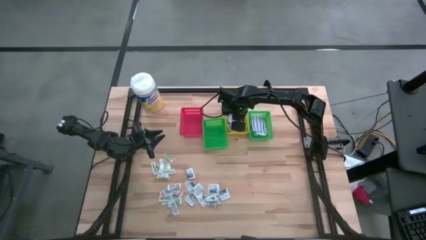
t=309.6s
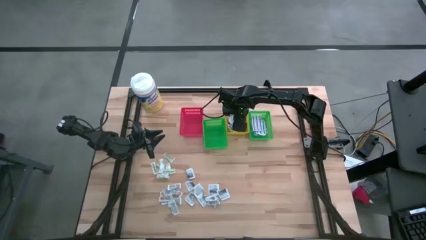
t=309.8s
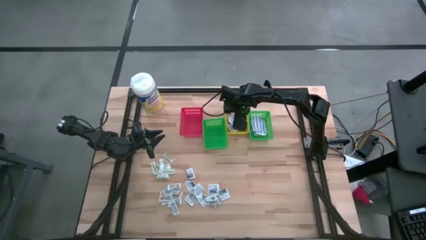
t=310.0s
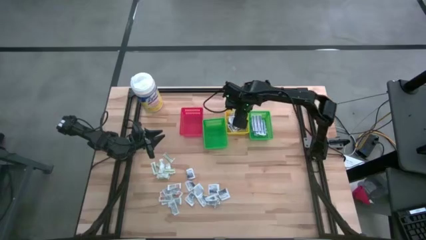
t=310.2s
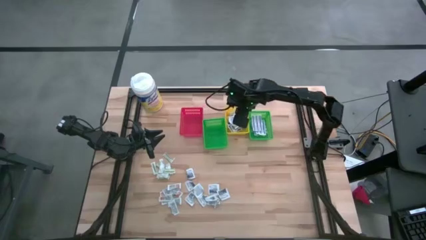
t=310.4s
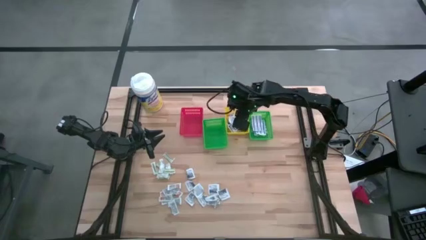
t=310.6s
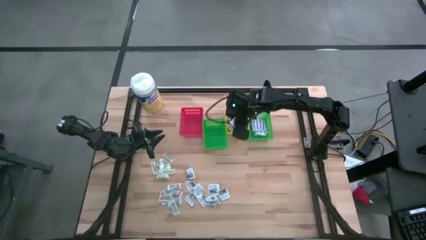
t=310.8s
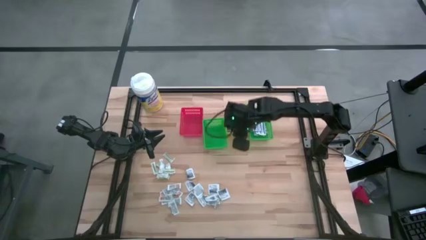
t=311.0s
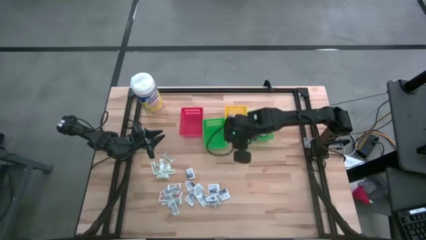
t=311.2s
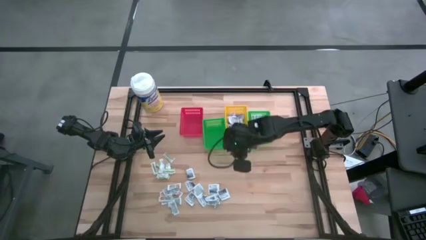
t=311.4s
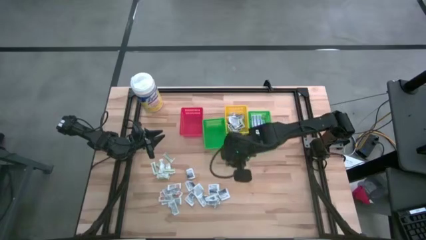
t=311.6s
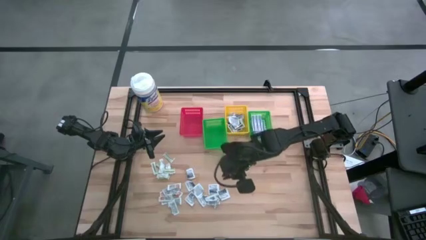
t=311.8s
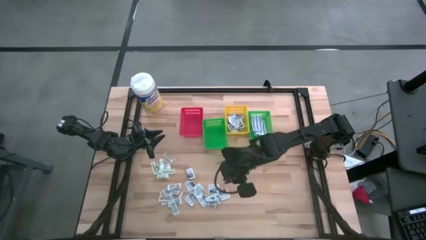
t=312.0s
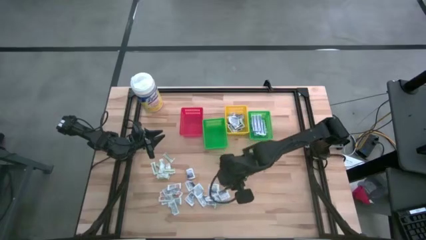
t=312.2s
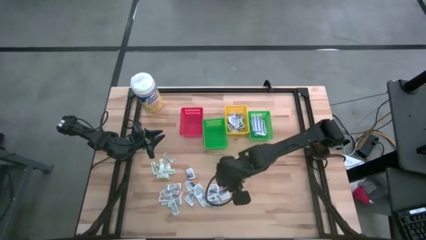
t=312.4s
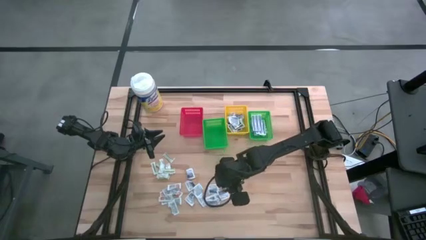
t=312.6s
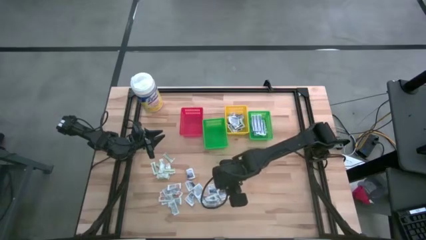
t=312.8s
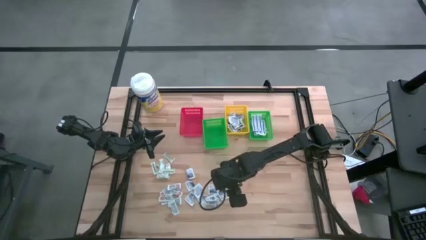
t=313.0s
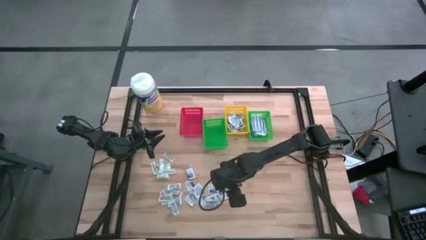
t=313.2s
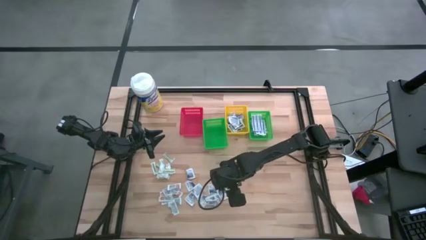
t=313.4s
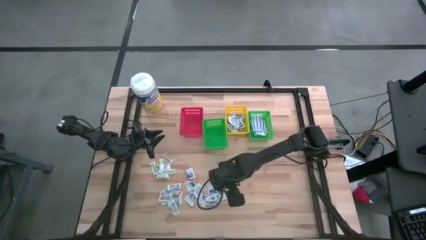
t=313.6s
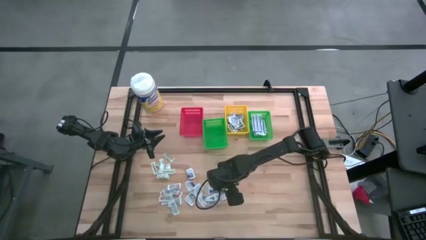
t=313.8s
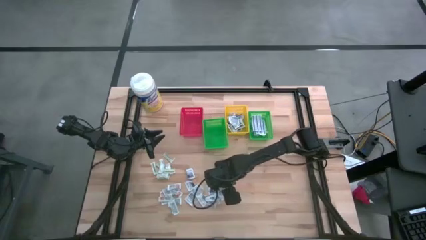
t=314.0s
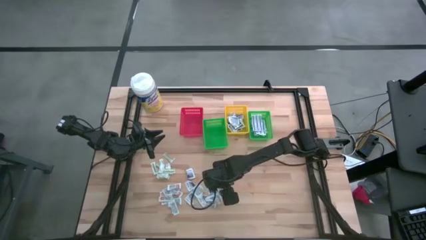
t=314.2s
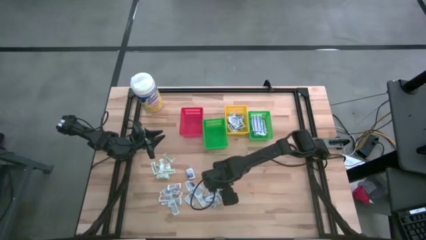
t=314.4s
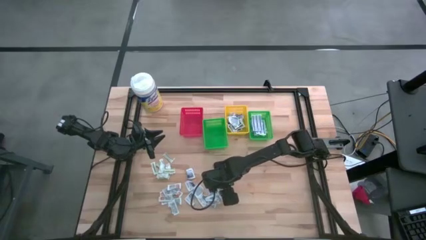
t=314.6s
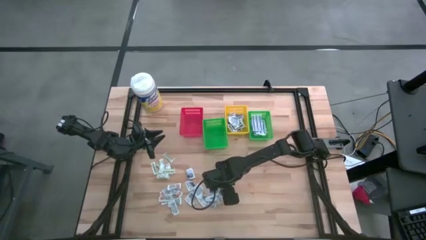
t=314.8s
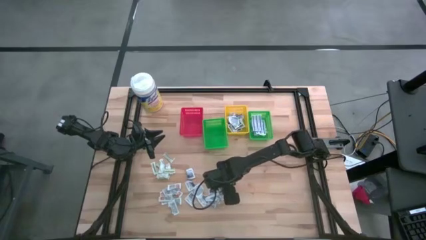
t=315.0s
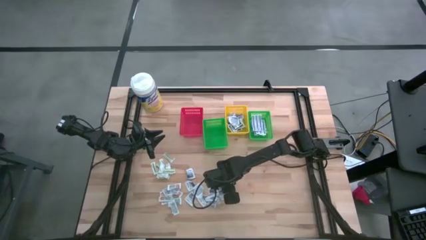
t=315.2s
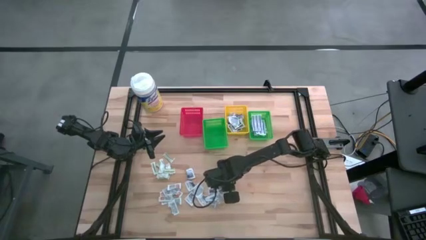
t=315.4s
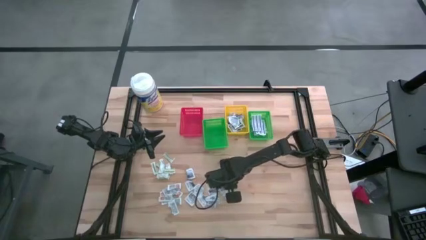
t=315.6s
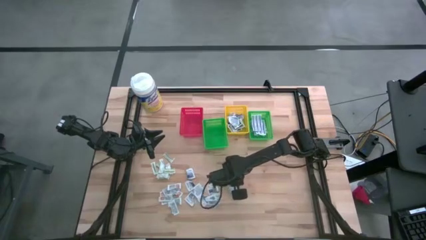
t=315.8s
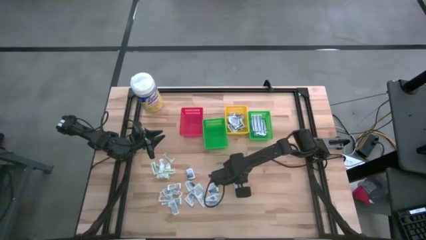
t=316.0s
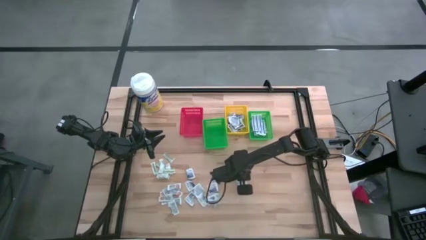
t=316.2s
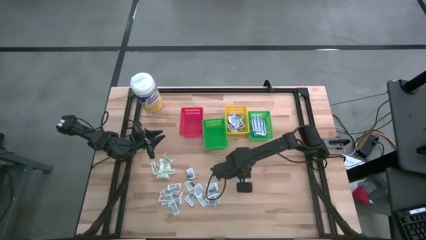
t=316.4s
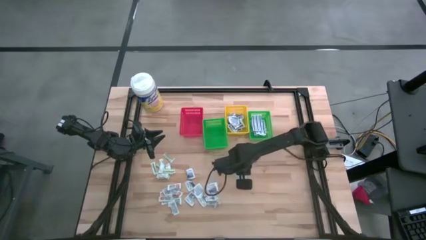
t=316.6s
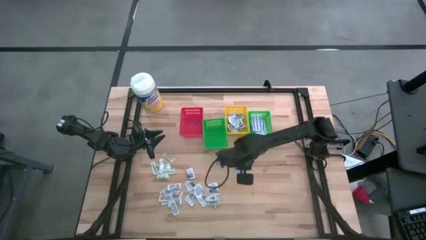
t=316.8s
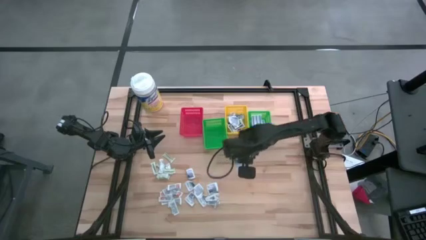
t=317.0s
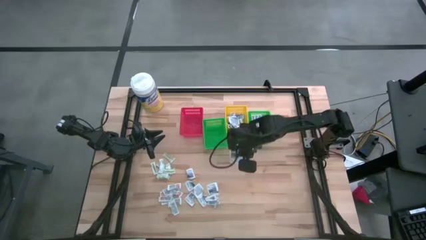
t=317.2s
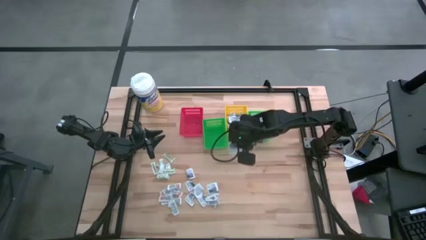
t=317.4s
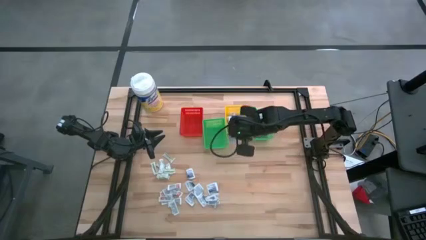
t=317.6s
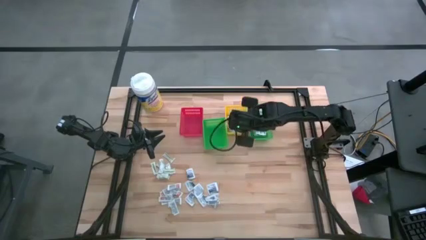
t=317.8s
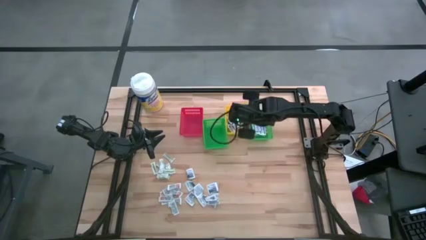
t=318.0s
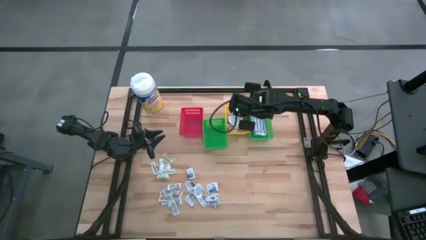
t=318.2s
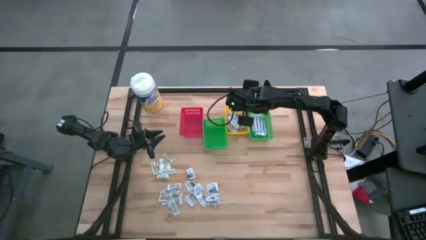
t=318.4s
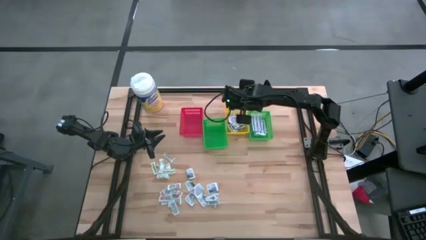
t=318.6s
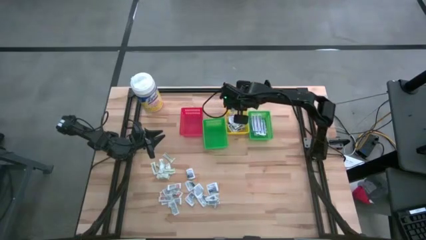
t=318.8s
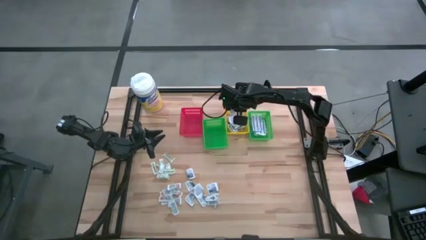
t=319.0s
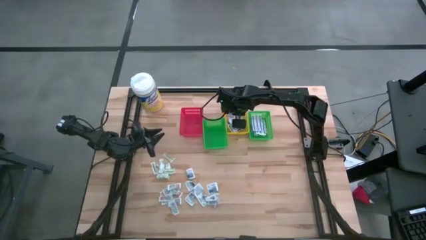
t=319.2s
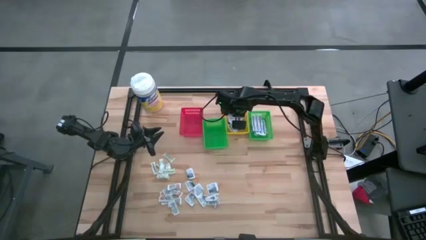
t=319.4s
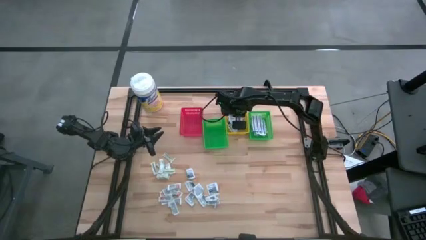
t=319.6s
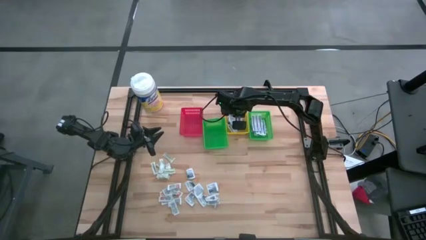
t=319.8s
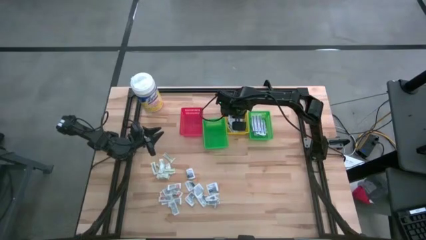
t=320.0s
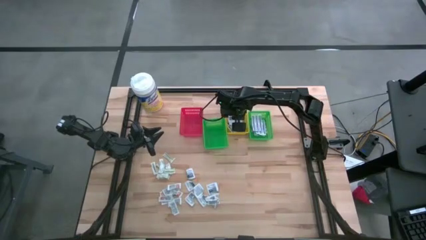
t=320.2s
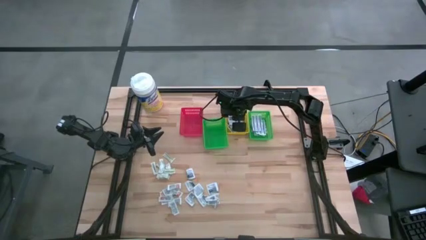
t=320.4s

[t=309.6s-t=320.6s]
Task: Pick & Place First Aid Supplies
Put the alcohol pad into the yellow basket

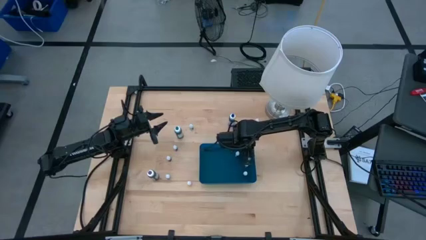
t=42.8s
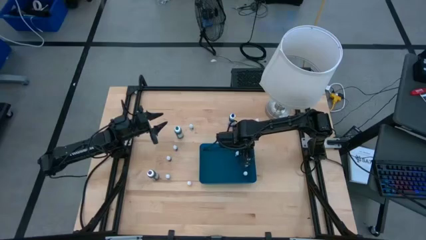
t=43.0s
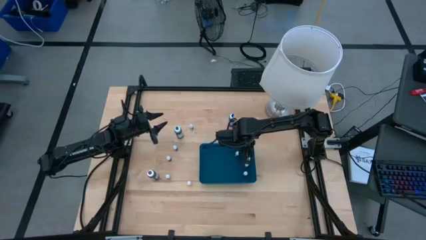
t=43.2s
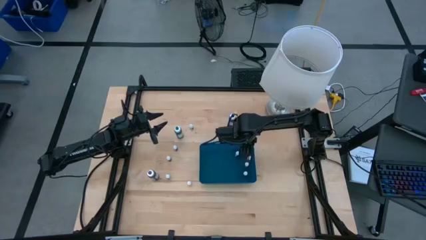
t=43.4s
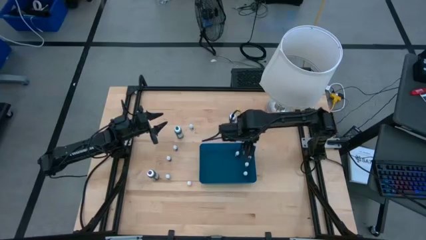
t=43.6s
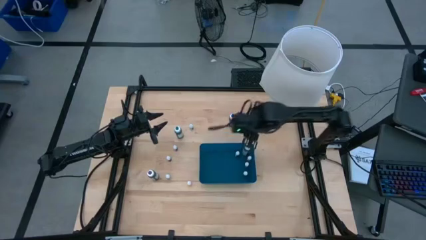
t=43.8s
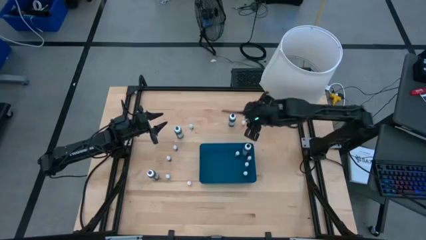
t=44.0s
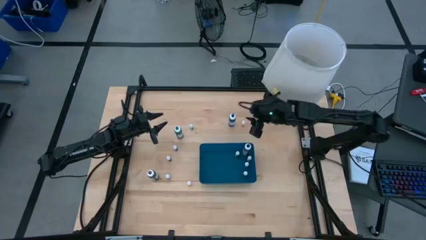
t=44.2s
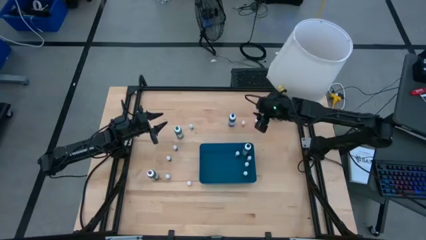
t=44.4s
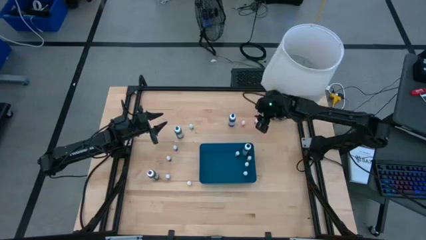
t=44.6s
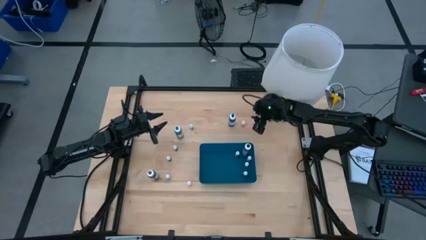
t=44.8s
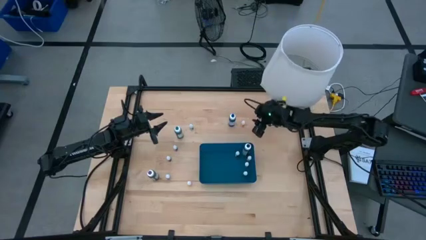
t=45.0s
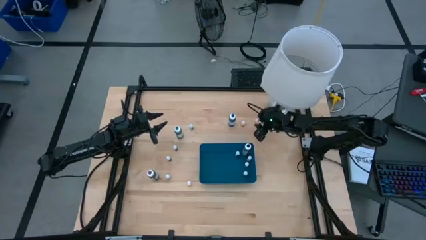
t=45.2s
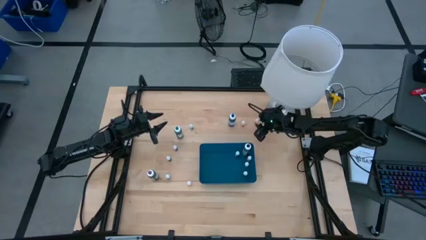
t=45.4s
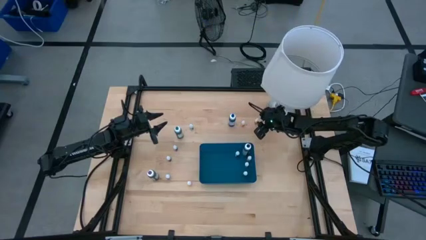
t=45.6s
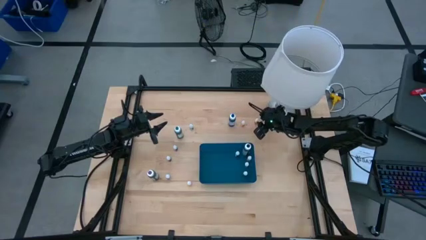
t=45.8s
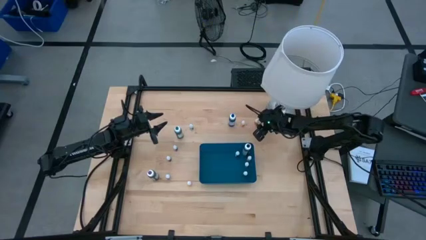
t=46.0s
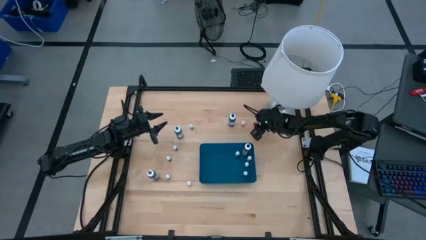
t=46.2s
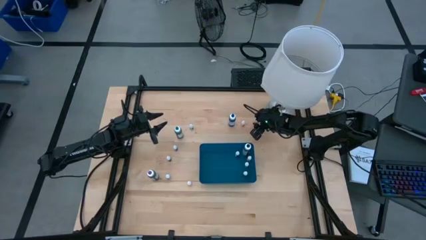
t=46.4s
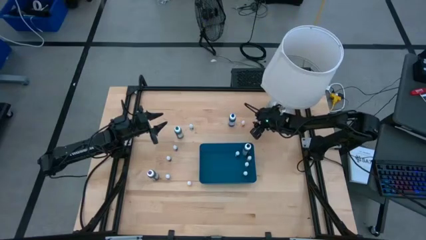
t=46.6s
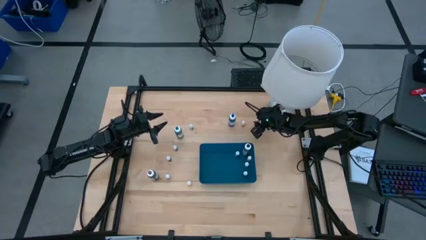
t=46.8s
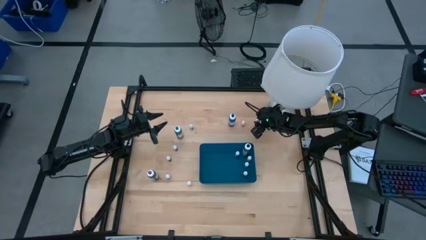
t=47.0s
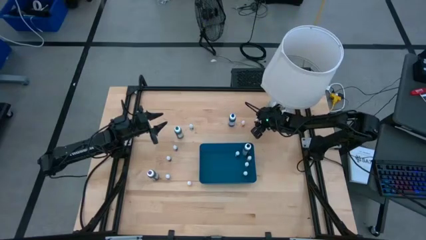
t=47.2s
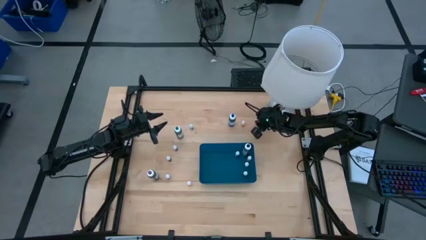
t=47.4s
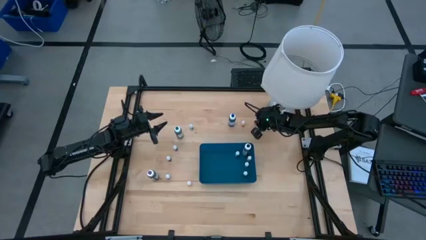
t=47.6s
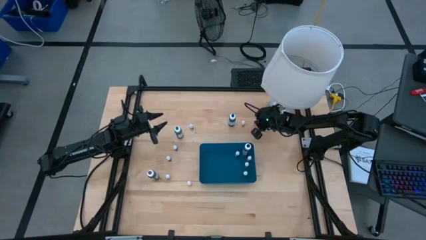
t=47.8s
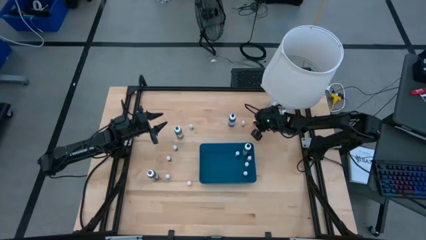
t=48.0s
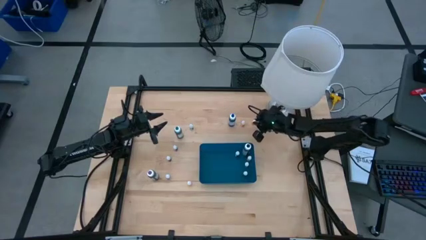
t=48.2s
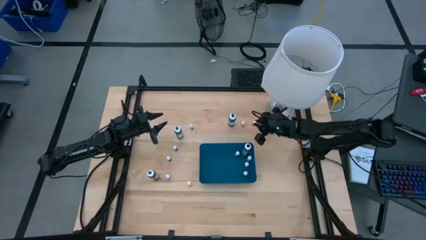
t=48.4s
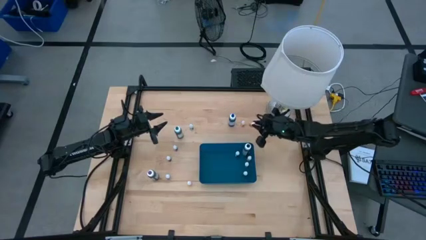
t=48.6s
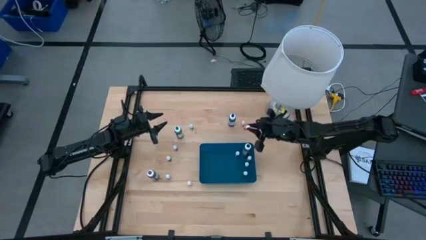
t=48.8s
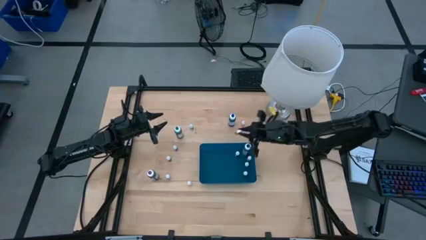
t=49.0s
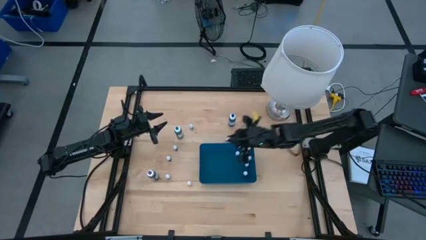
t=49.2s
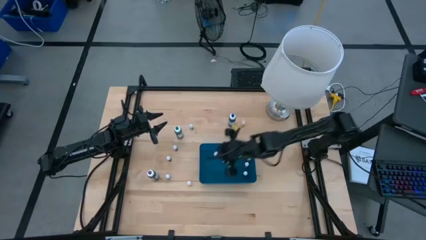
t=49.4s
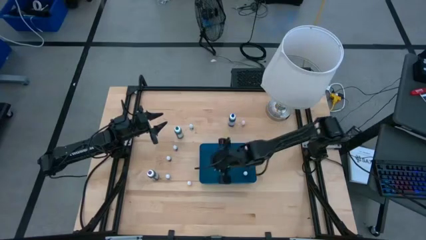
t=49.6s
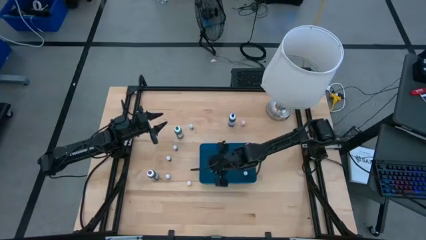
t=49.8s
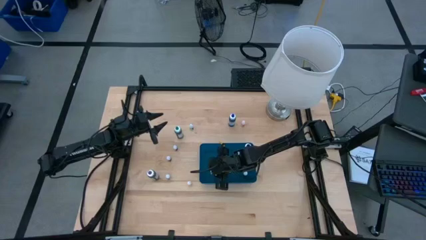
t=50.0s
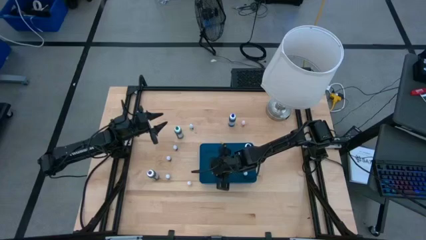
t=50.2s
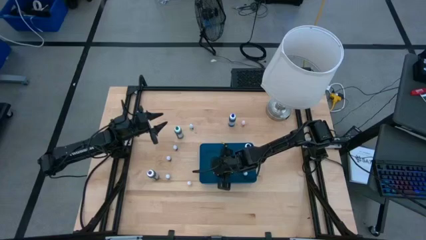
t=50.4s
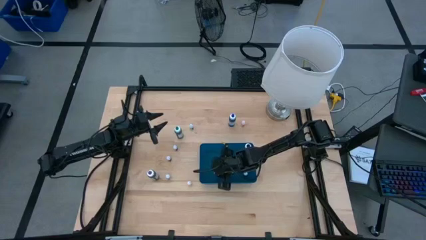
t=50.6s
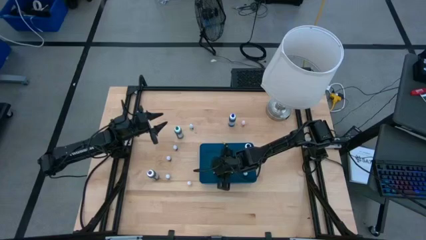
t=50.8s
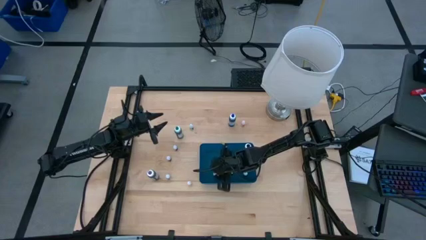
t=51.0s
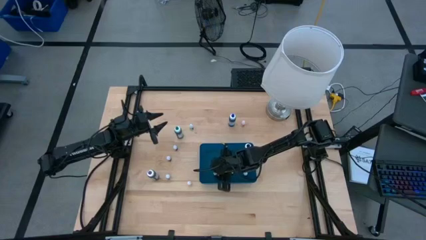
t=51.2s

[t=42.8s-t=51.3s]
Task: Pick & Place food coloring
Put the small orange food coloring bottle into the blue bin
